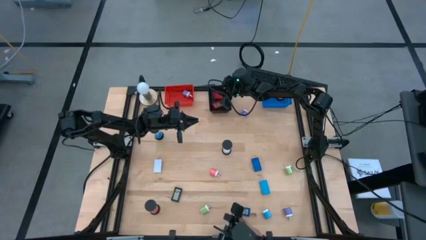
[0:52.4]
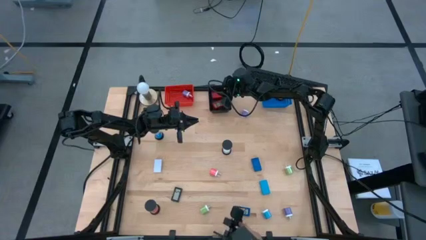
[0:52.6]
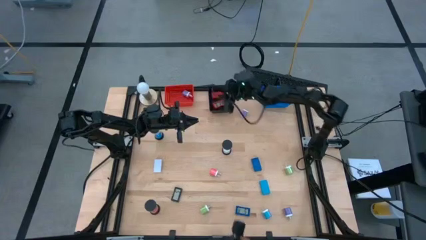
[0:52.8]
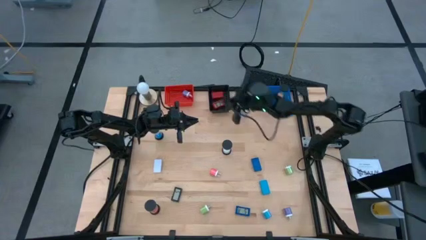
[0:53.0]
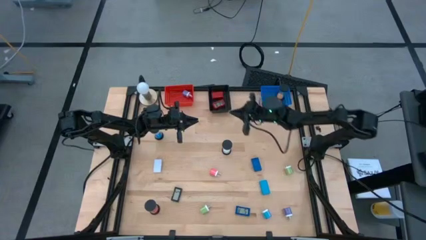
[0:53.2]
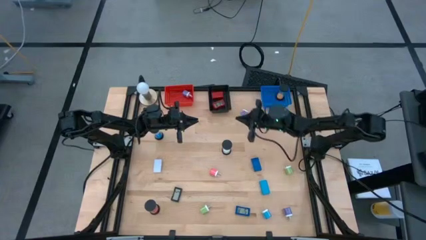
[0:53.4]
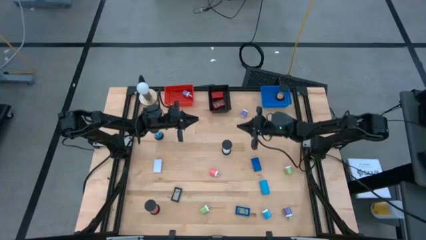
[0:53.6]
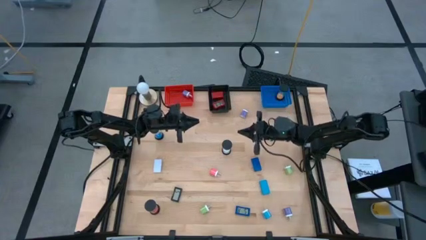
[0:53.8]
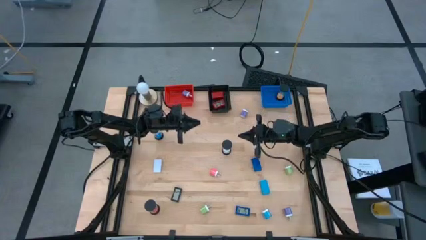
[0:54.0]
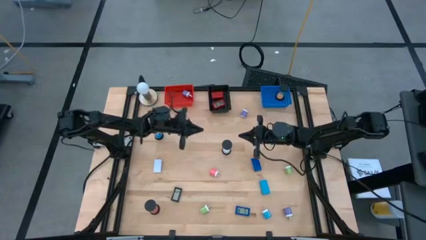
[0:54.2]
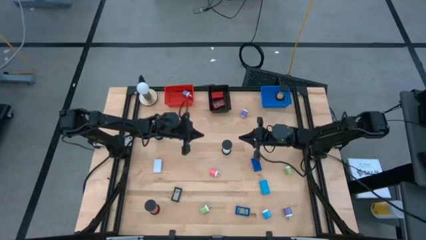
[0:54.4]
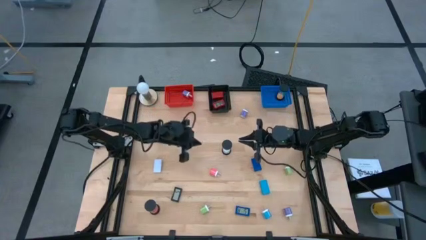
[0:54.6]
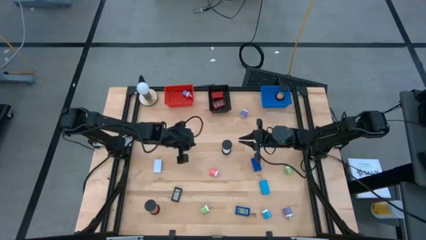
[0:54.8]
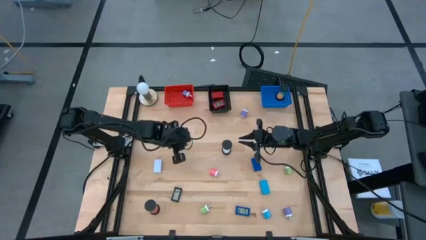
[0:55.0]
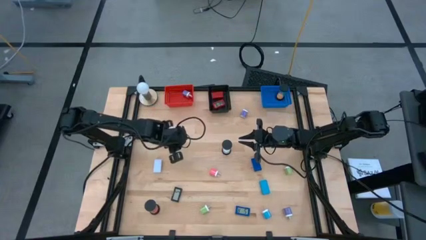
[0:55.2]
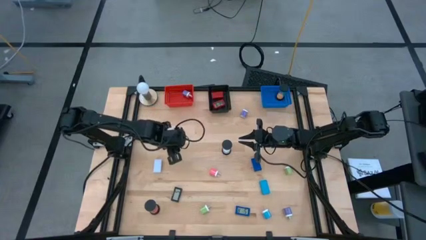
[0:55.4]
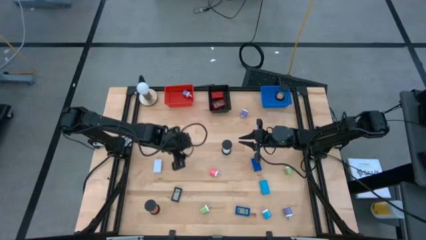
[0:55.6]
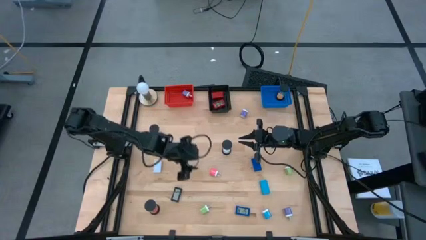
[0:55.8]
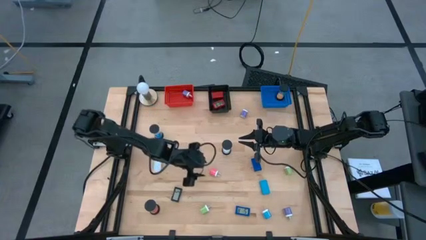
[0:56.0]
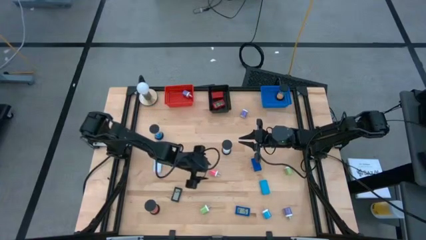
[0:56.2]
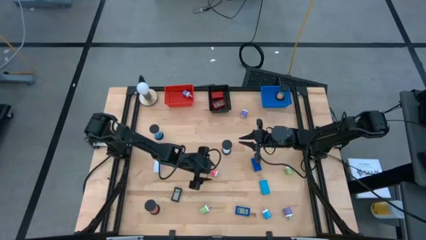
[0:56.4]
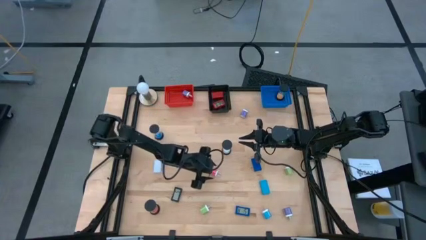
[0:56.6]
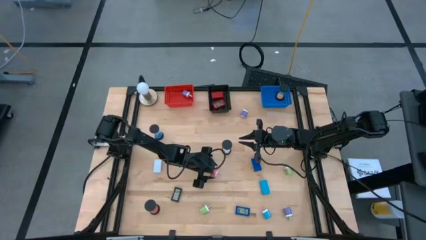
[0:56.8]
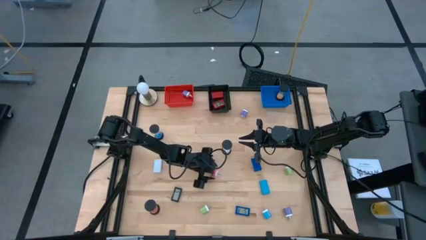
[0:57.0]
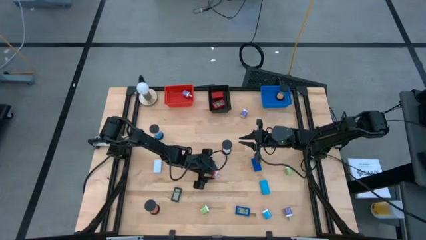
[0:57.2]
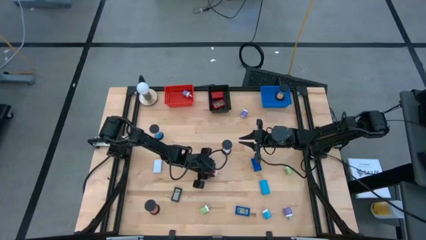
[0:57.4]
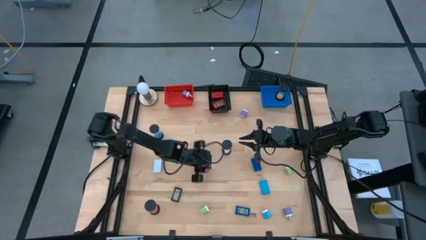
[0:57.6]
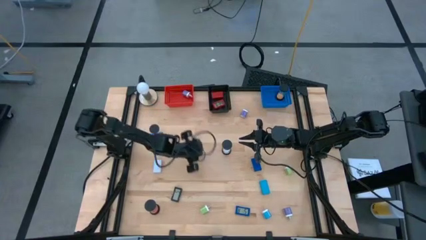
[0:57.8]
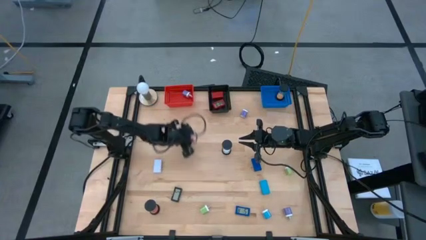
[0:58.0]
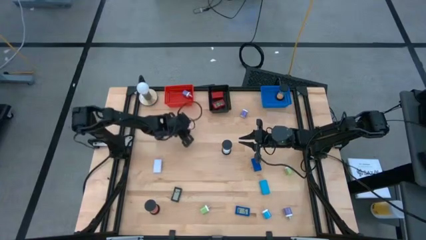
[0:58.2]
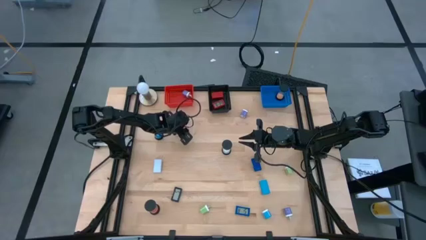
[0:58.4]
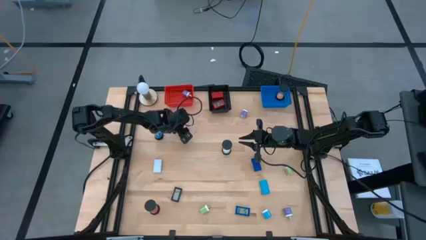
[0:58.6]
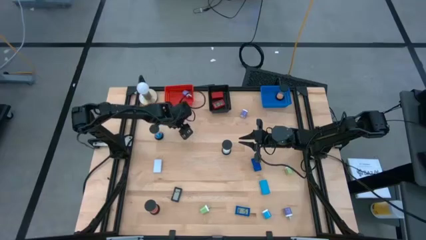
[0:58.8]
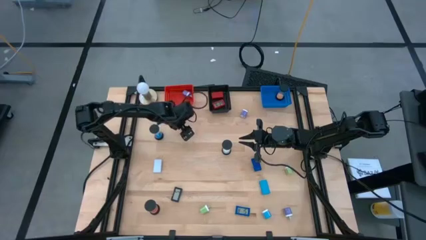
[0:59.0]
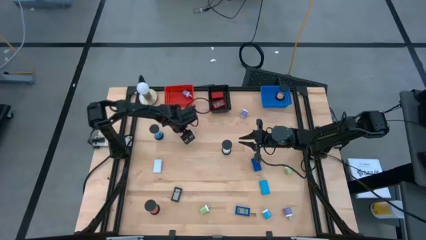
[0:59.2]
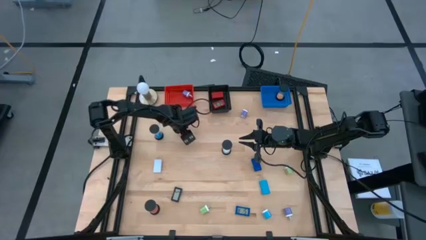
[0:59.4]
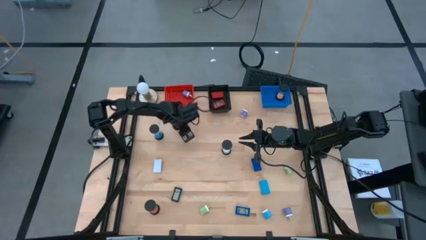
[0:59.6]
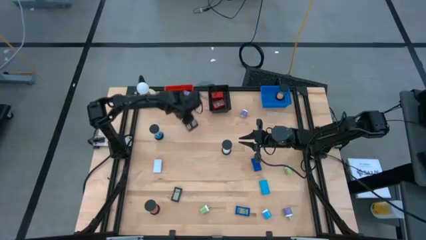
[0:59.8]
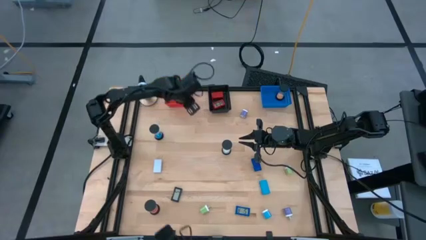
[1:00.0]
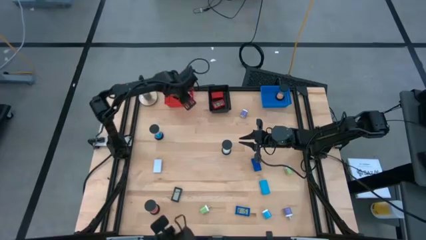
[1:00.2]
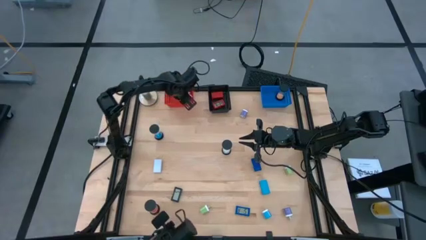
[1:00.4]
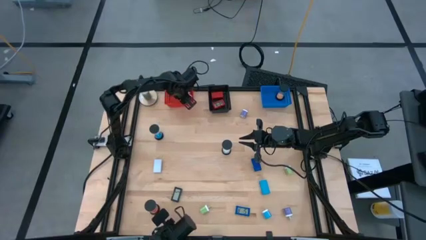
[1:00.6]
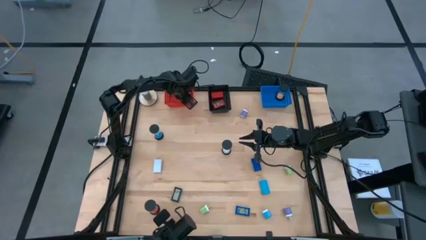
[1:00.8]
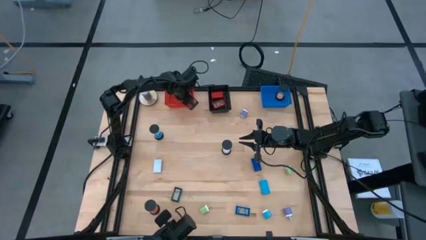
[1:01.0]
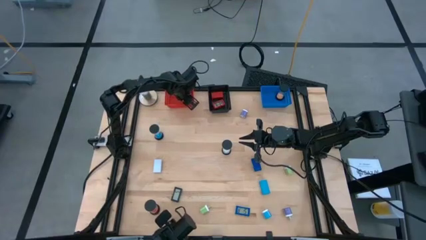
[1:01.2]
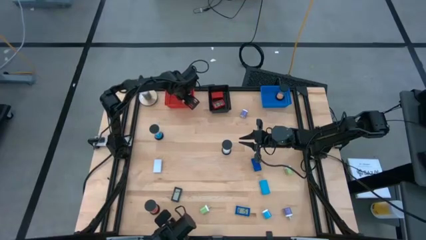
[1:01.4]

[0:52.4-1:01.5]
Task: Pick & Place Office items
Put the pink charger adapter into the red bin

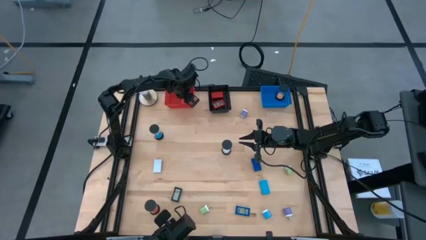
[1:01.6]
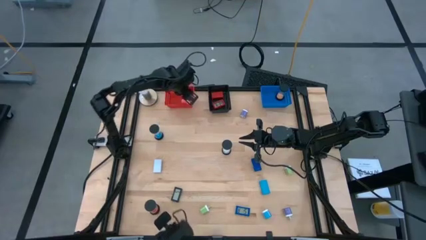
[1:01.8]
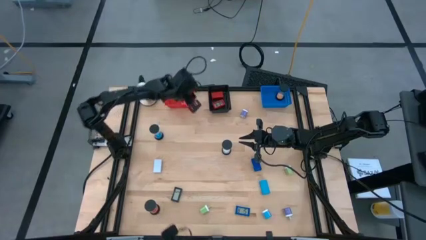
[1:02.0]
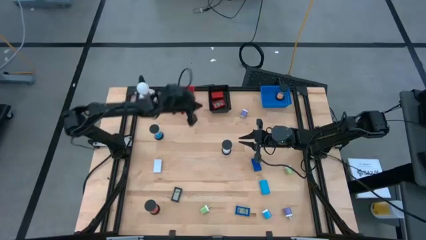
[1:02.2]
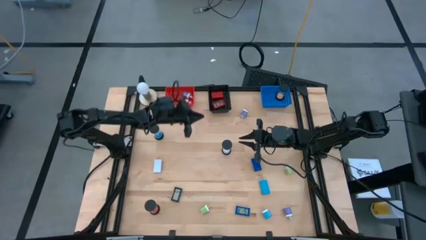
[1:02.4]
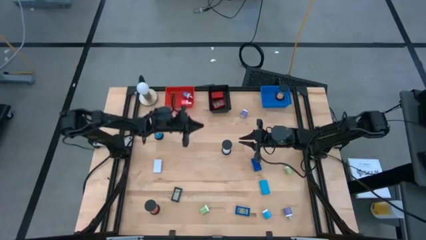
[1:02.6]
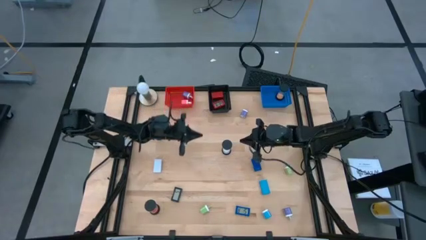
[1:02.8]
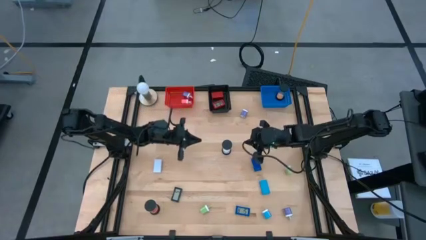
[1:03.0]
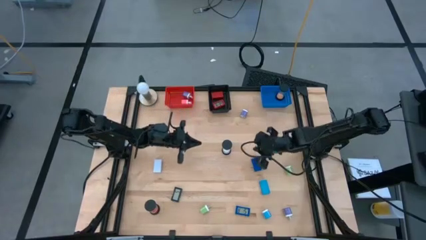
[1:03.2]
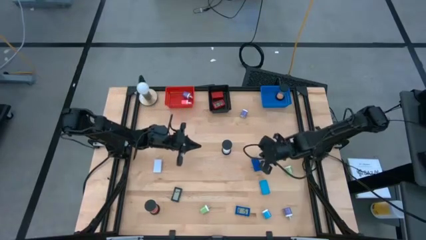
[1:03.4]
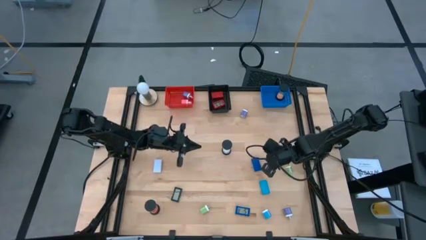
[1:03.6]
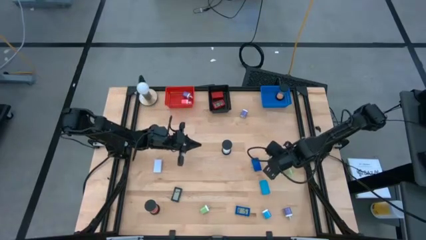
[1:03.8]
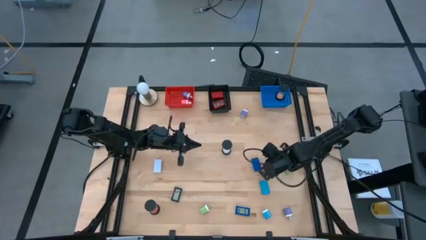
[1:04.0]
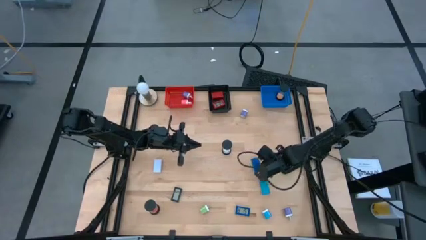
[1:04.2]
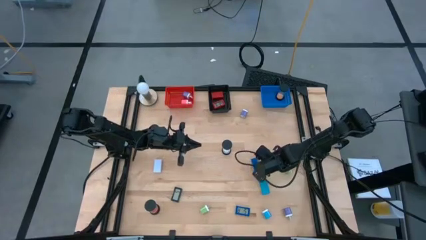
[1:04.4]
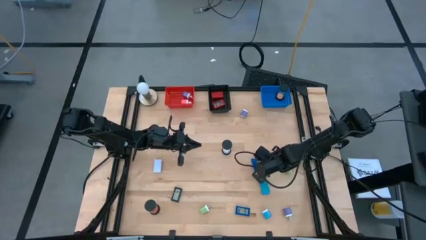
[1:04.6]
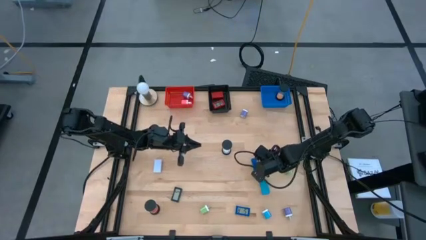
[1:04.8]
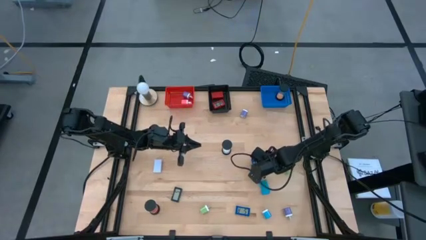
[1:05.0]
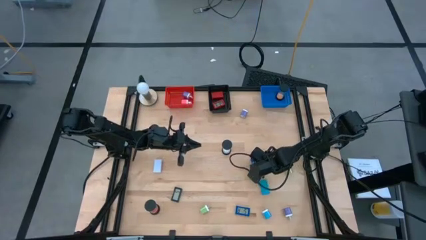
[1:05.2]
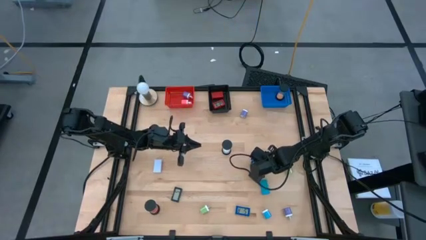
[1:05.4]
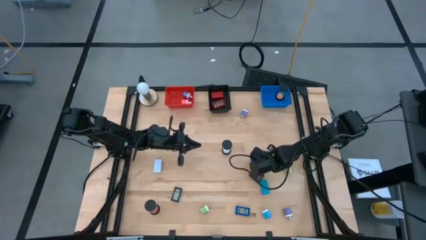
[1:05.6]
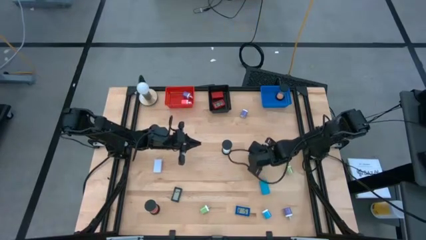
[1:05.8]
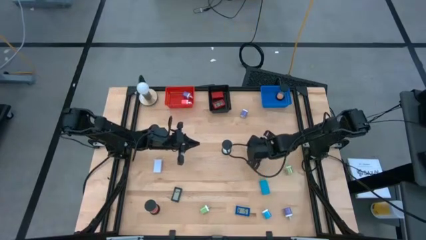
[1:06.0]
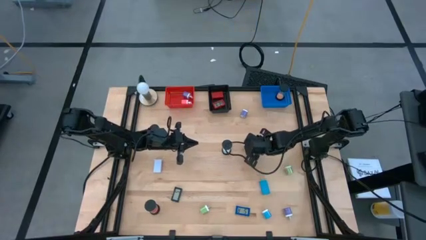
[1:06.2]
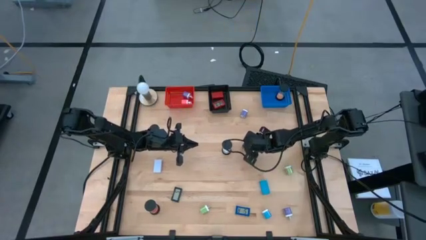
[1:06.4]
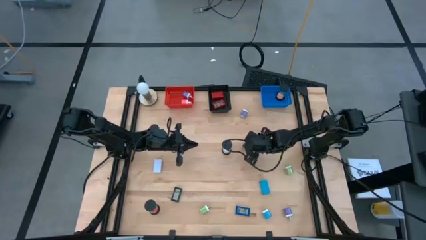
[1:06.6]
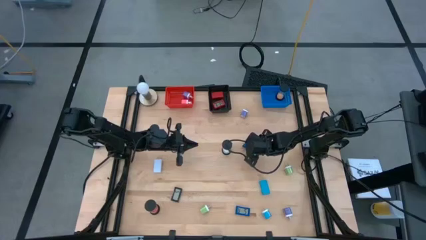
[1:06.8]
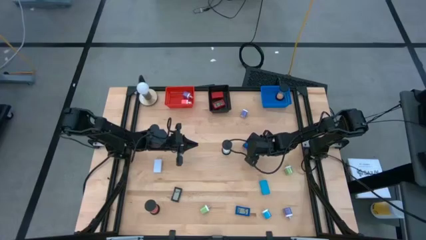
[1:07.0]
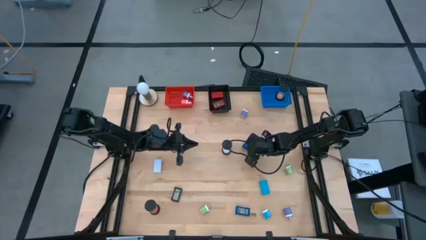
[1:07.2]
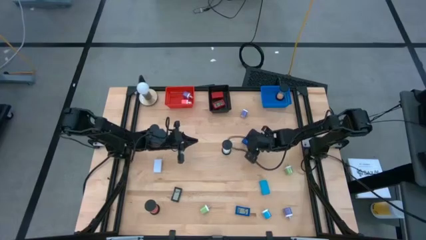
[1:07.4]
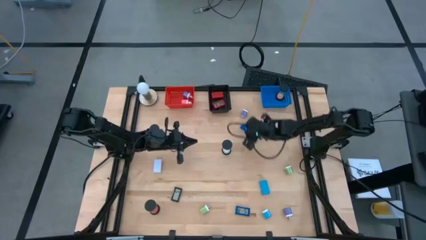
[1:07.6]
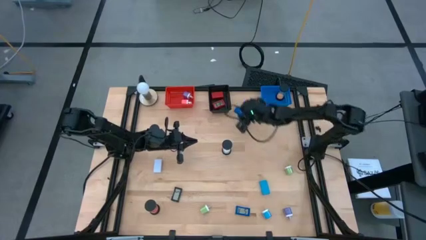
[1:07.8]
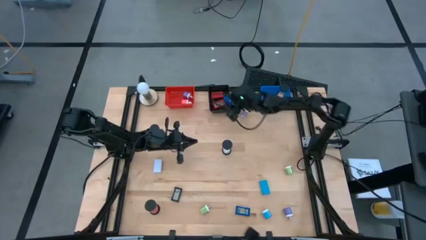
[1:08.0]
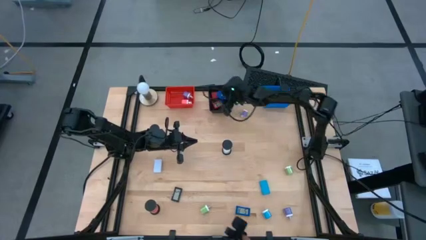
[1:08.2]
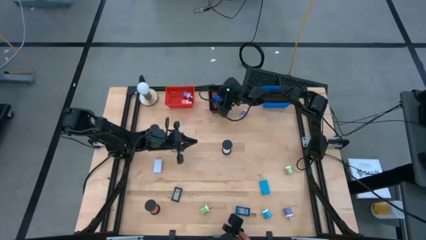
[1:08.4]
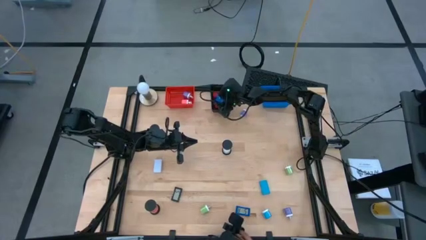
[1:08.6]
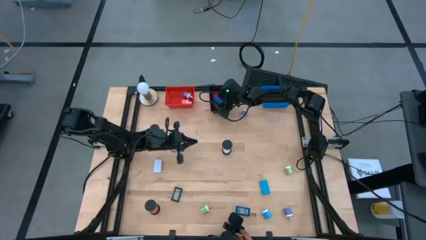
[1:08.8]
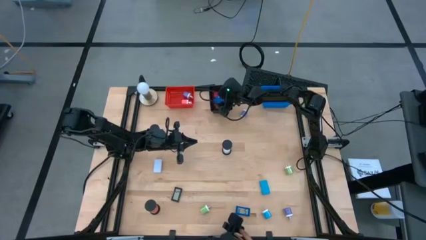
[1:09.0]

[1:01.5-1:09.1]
Put the top blue digital timer into the black bin
